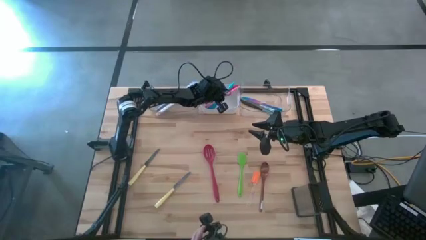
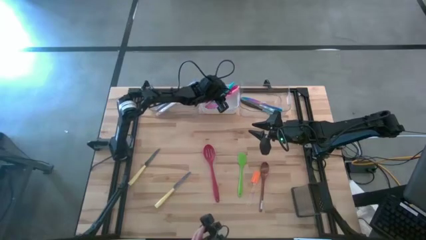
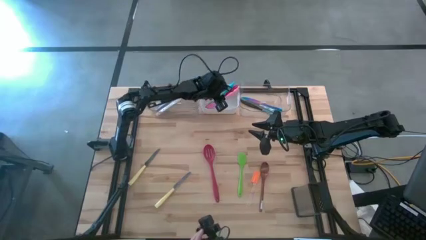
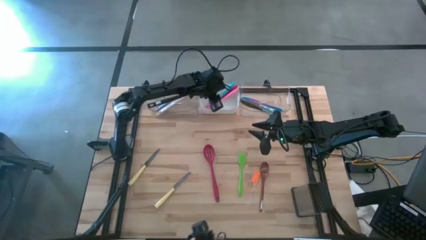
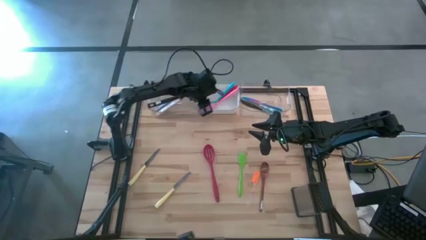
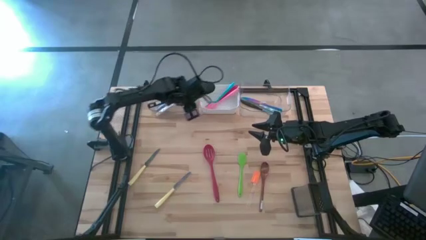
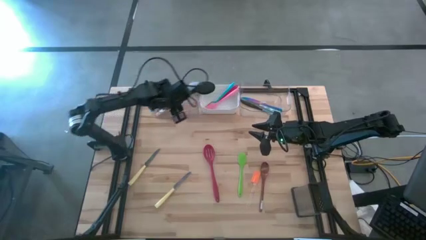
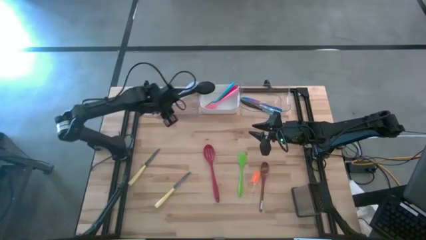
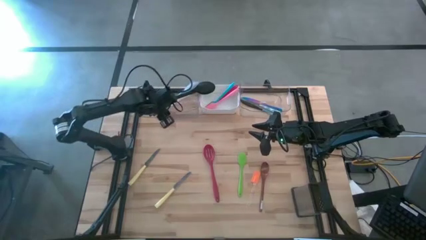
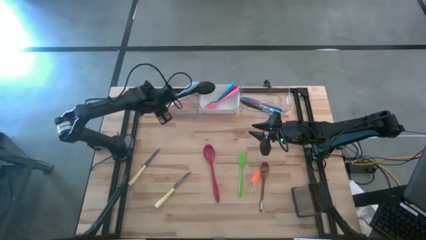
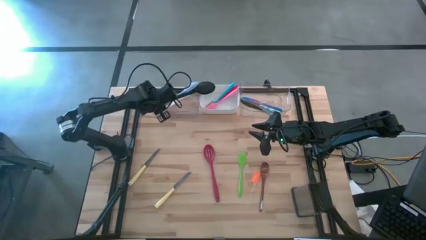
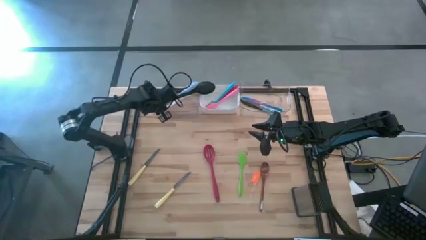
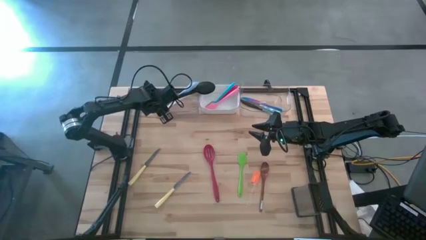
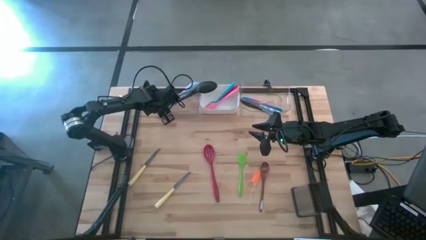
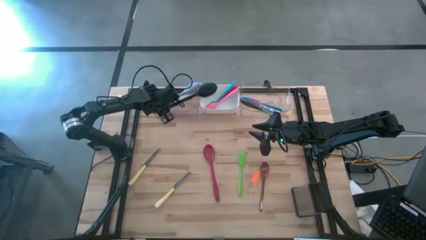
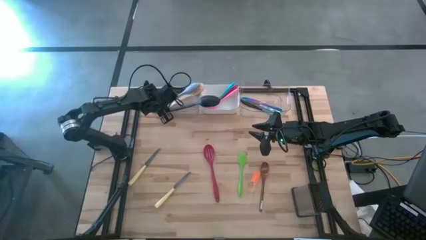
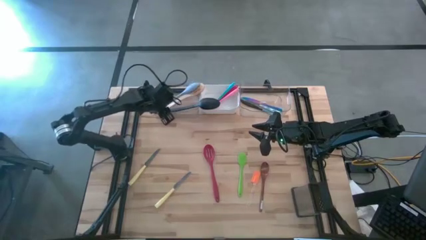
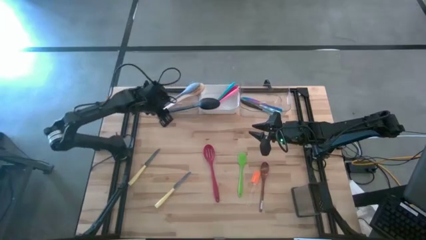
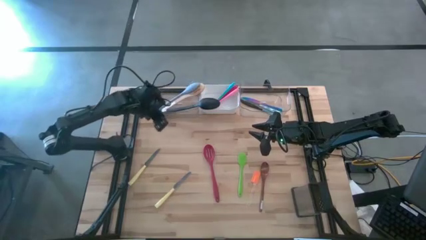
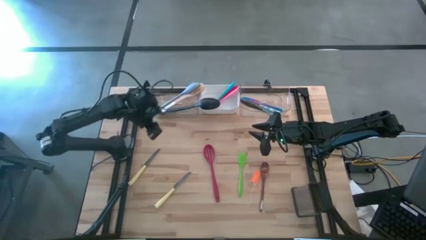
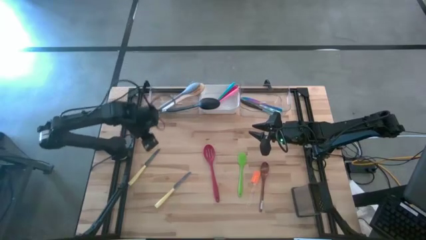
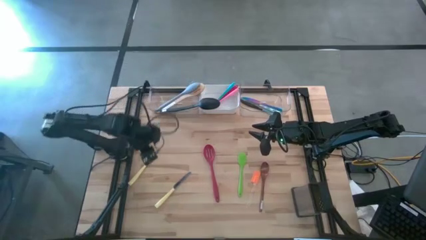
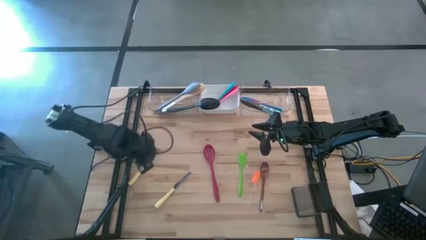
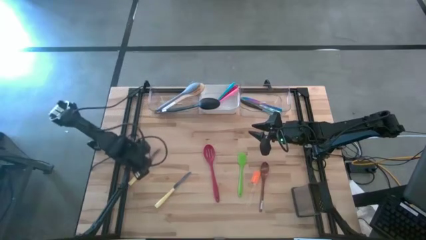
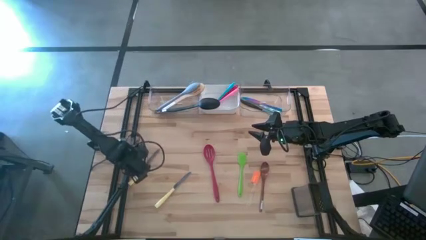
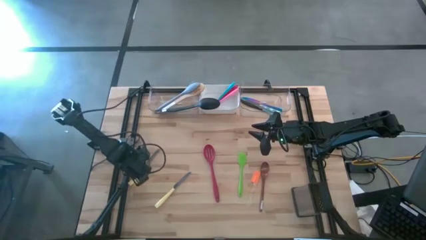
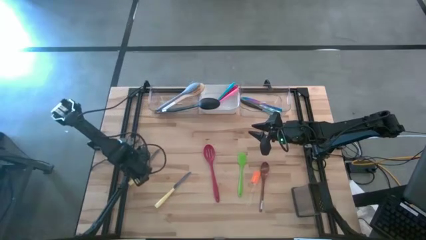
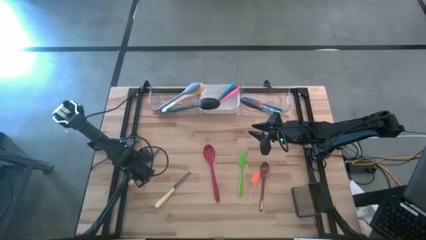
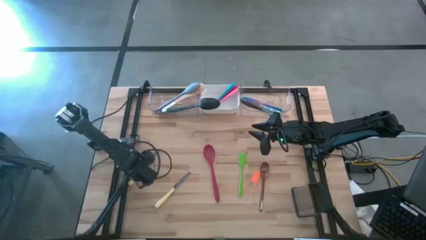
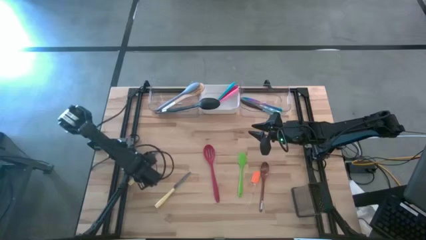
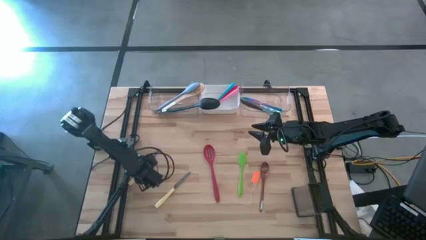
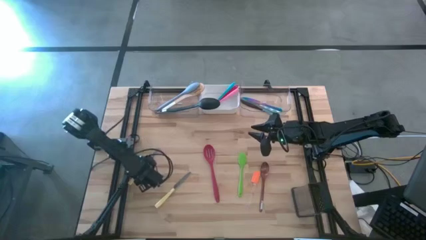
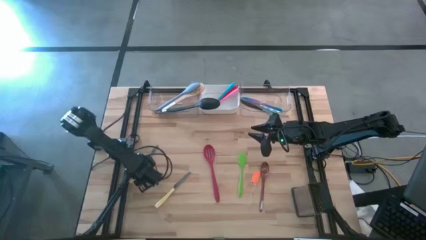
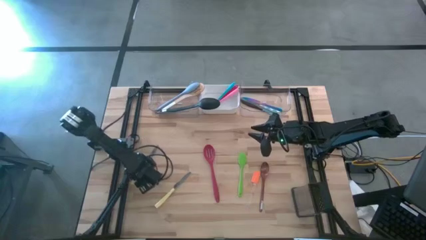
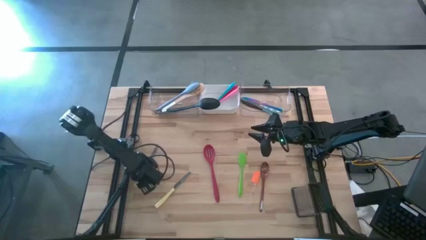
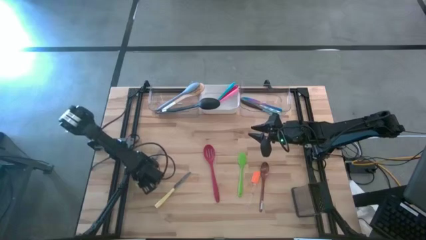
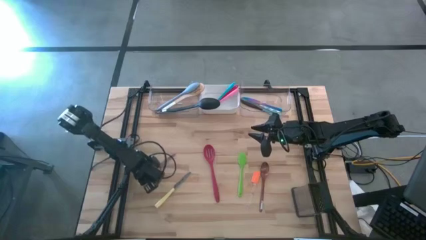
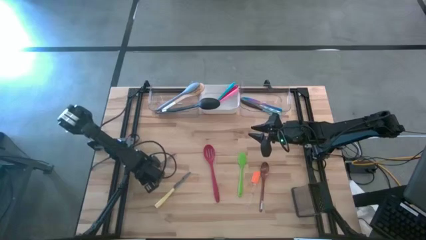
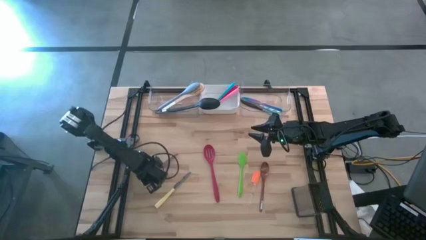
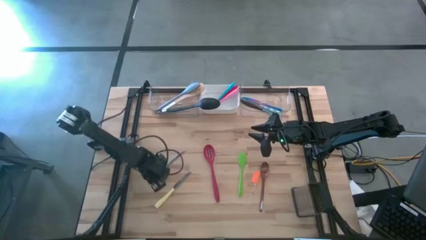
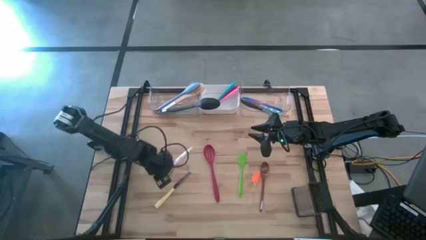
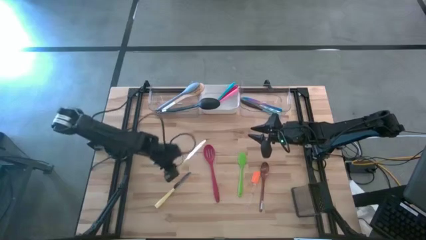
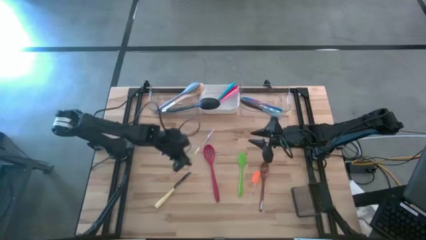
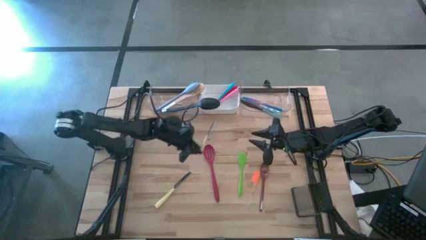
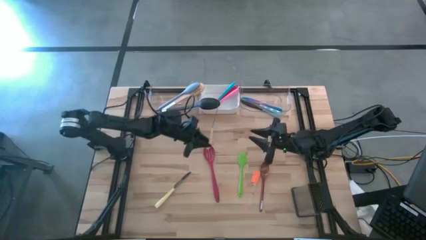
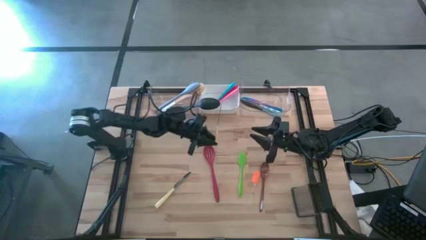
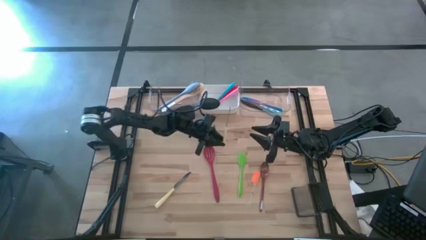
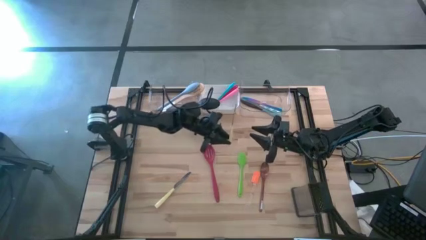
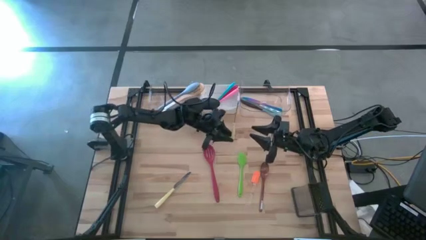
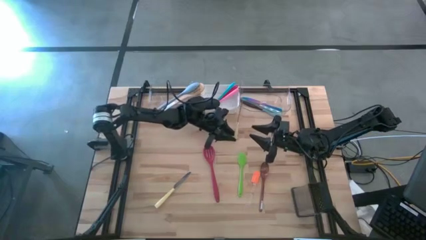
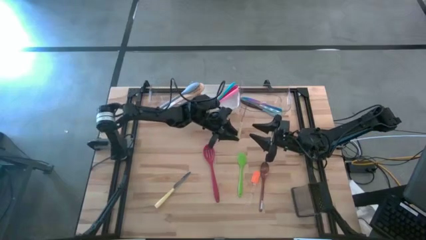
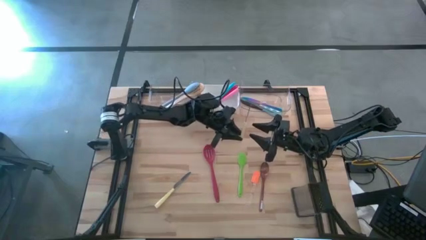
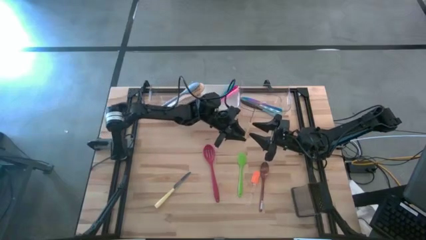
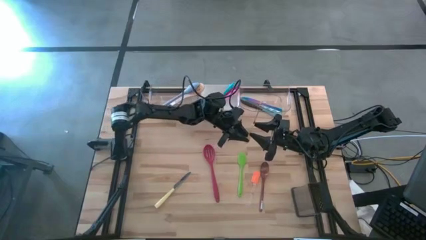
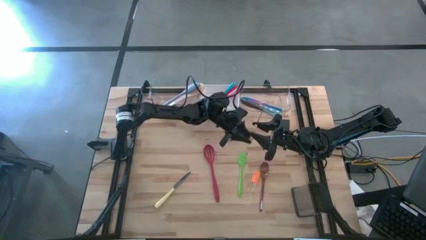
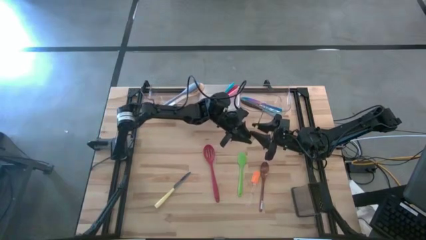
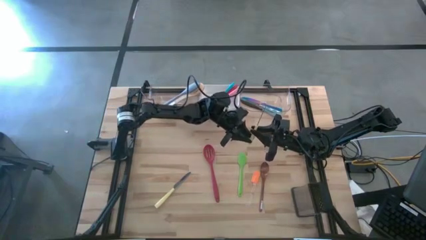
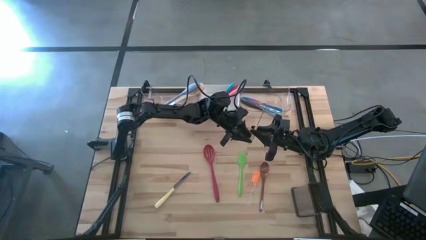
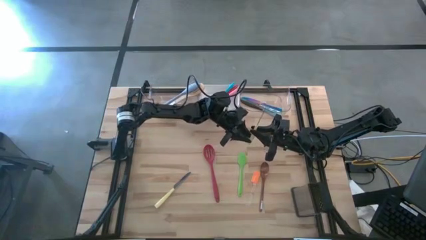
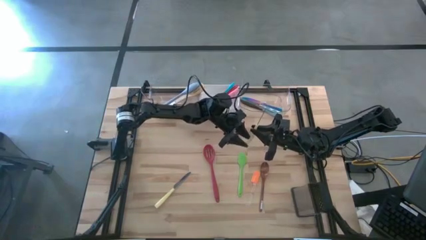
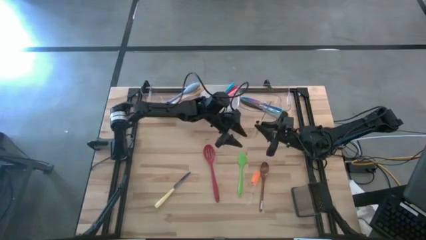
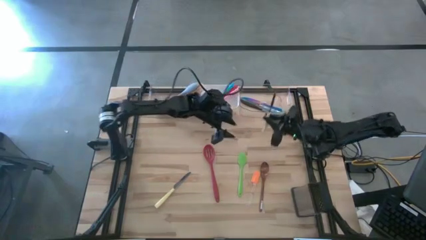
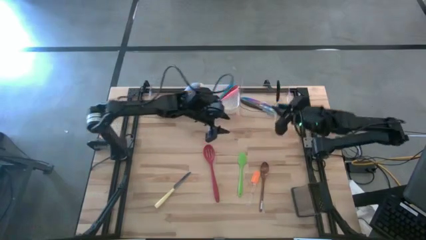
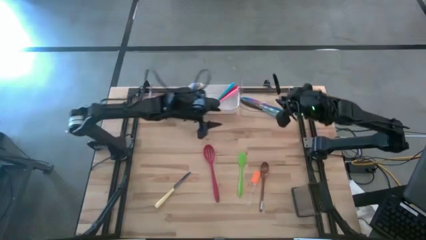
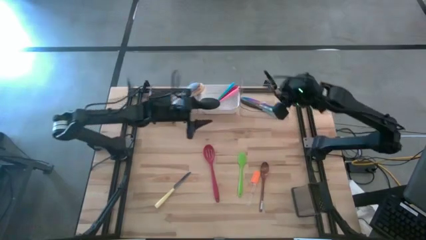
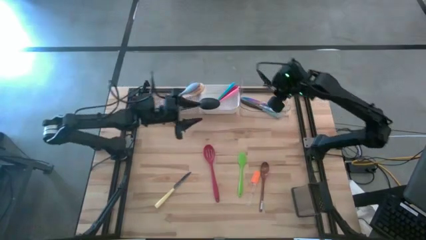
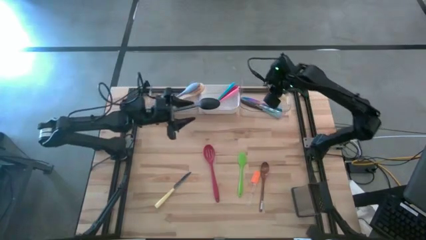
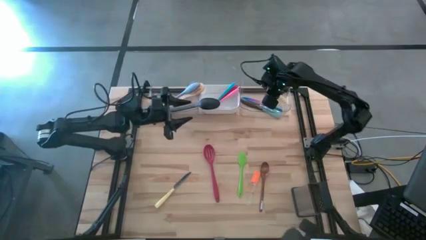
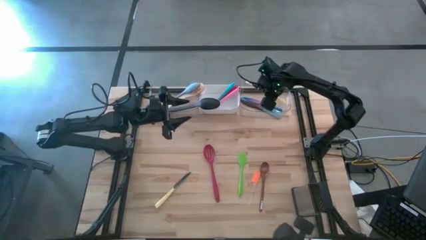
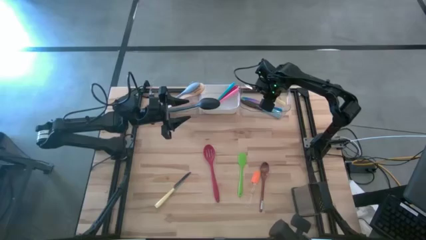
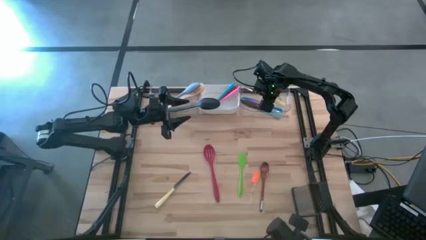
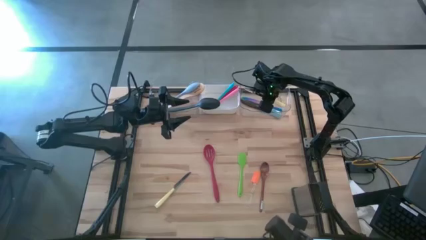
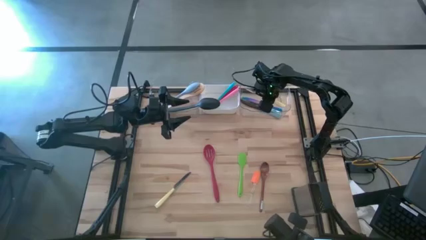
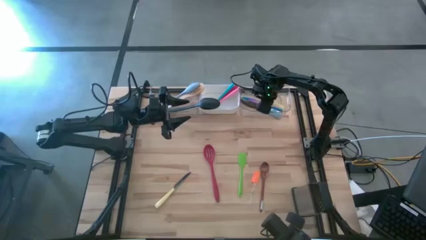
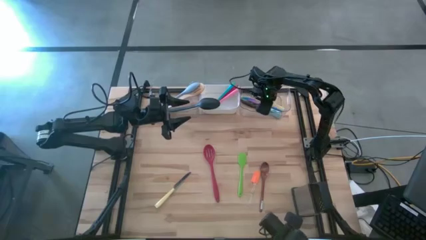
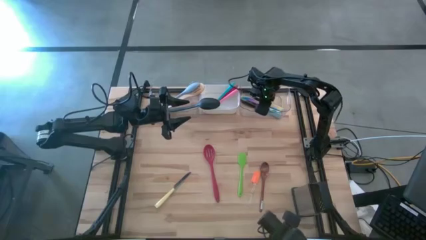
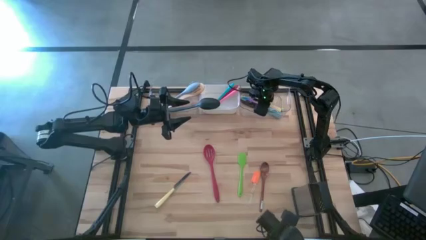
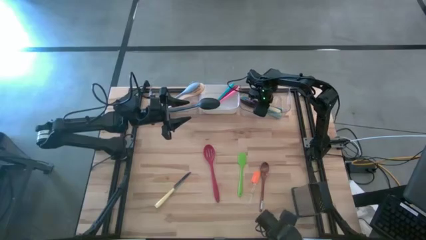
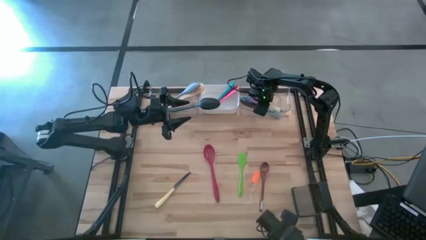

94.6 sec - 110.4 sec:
Task: Pick & Place Kitchen Items
Put the left yellow table knife into the right transparent bin

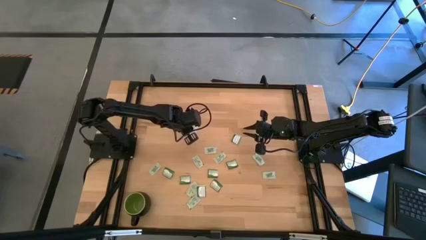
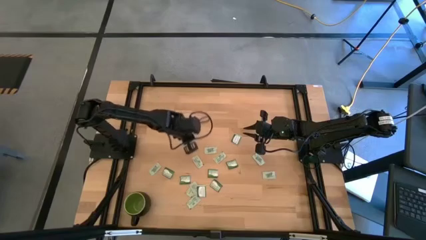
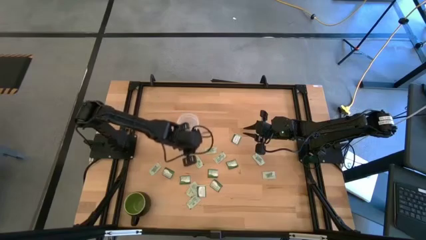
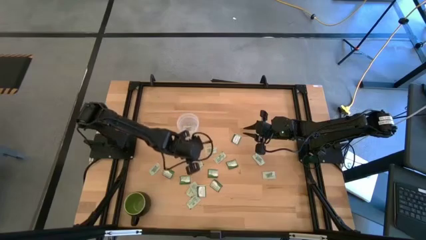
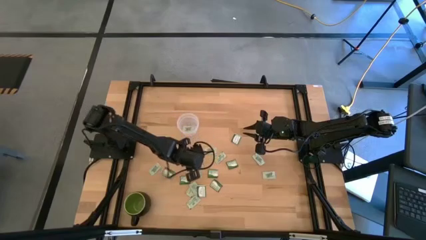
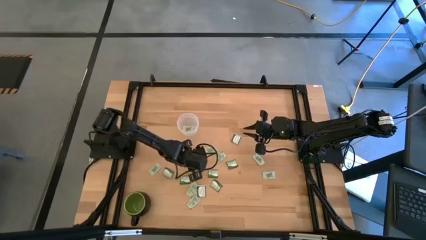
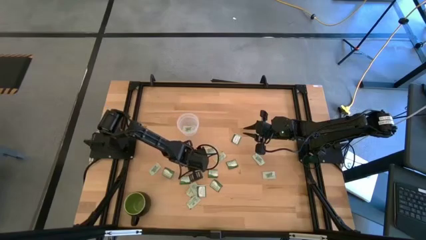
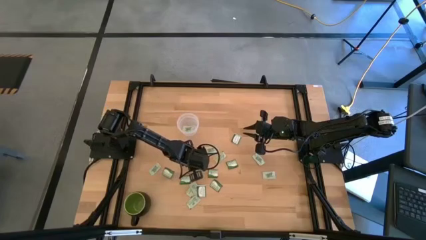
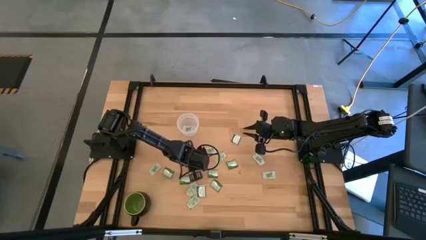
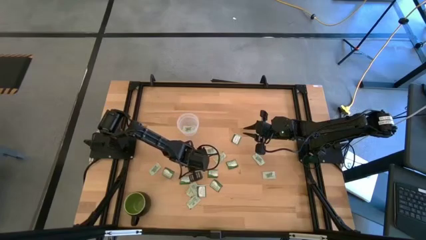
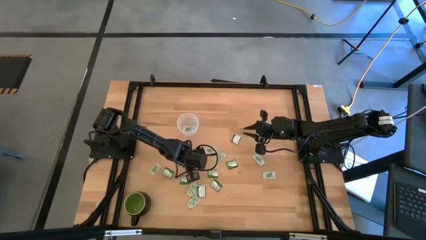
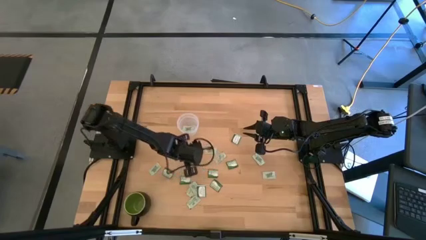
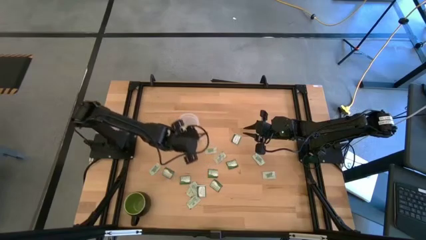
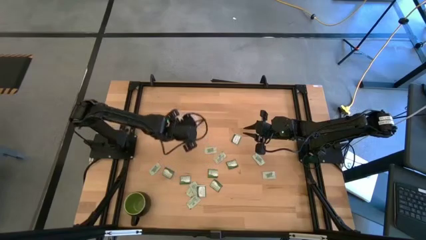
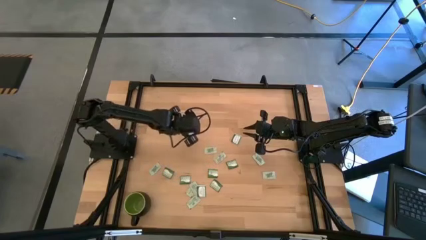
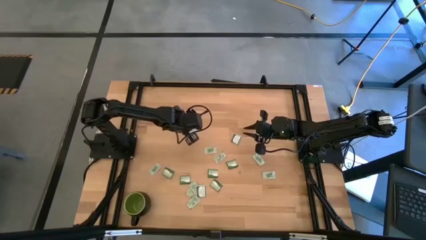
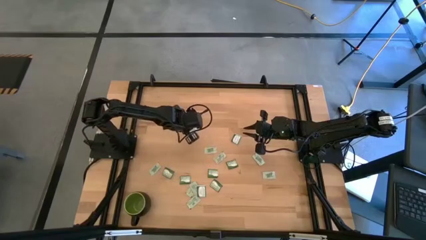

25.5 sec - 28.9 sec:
Task: Pick and place Stevia / Truvia into bins
Put the light green stevia packet into the transparent container
